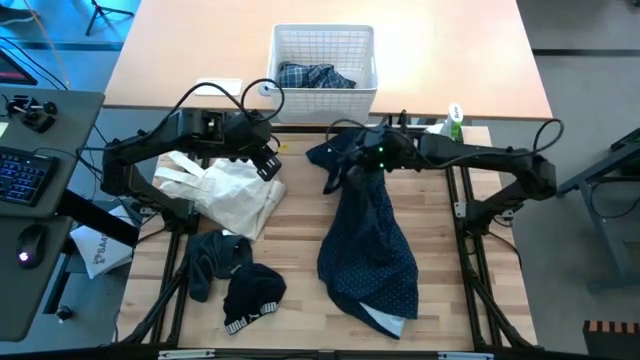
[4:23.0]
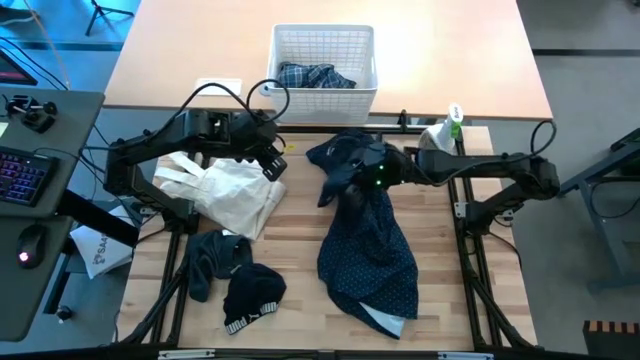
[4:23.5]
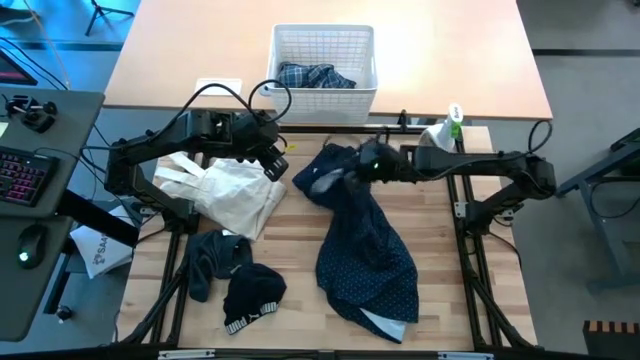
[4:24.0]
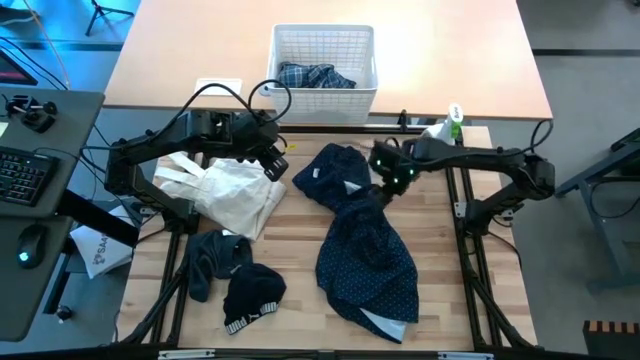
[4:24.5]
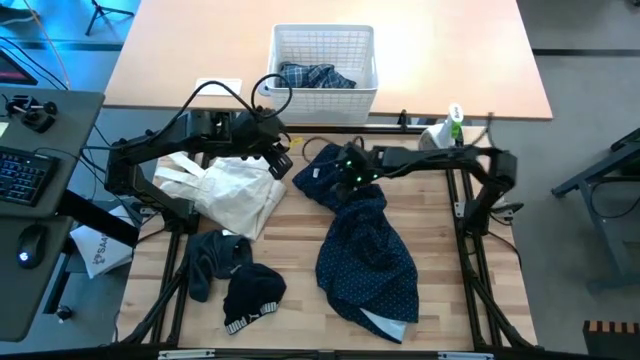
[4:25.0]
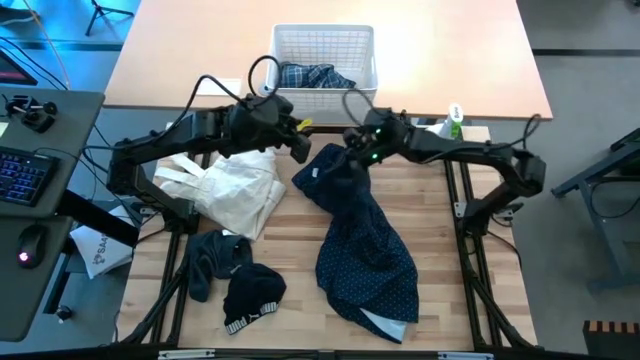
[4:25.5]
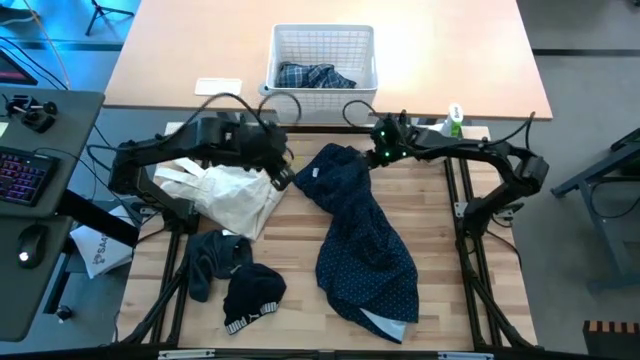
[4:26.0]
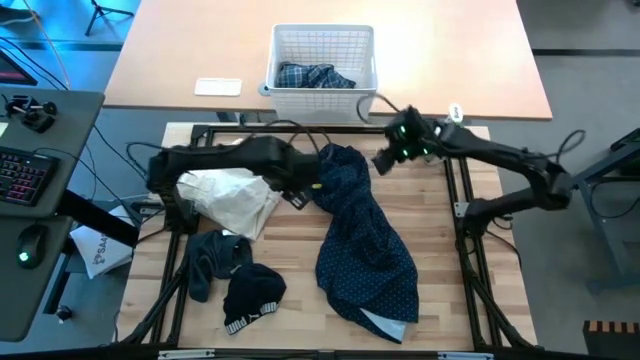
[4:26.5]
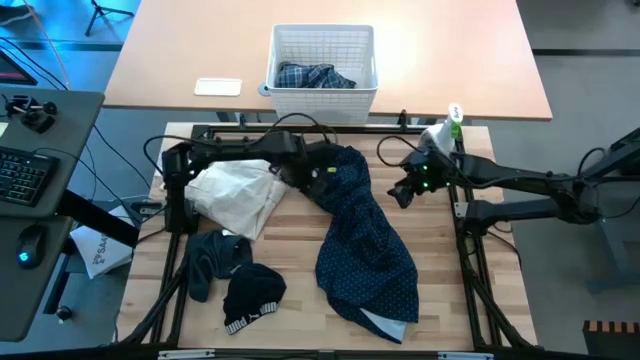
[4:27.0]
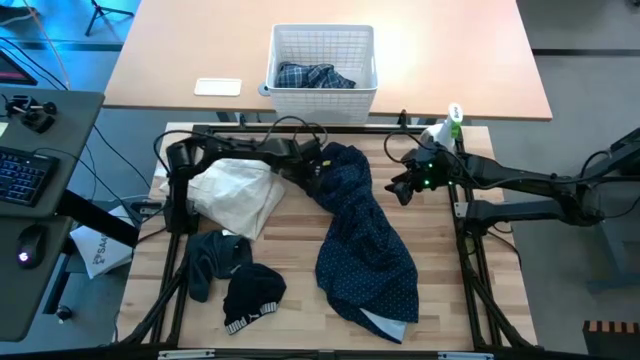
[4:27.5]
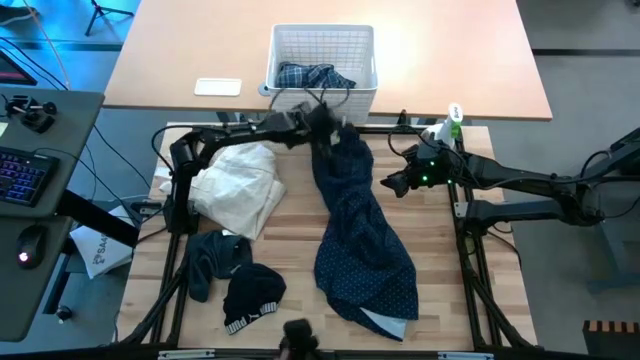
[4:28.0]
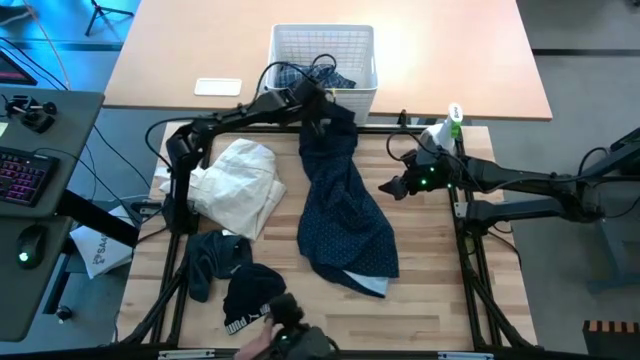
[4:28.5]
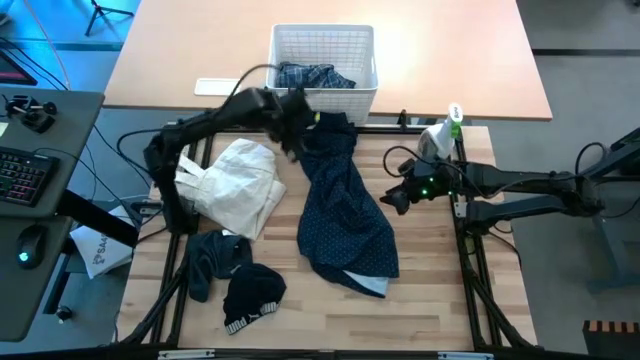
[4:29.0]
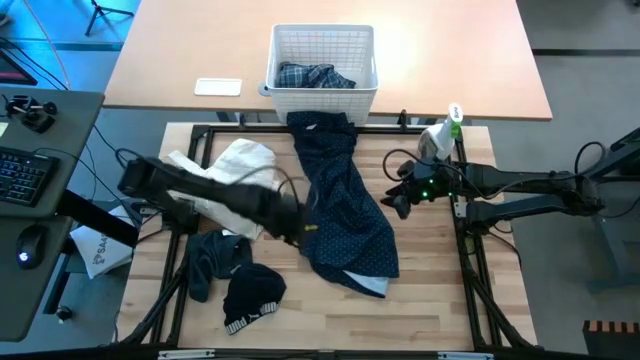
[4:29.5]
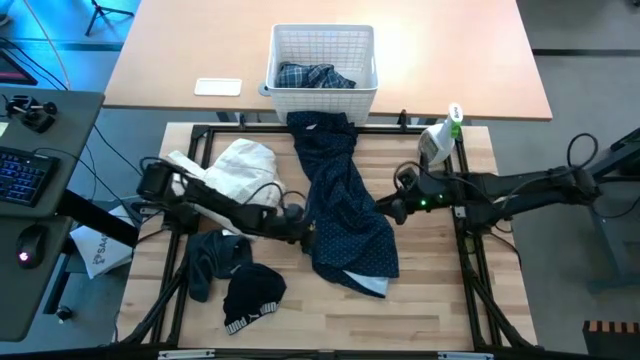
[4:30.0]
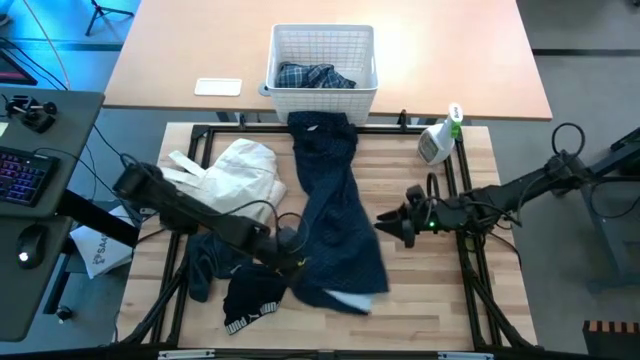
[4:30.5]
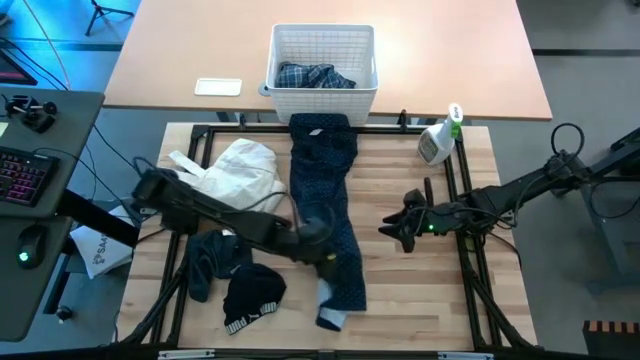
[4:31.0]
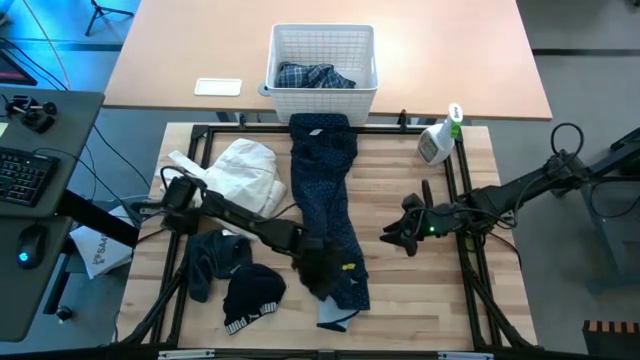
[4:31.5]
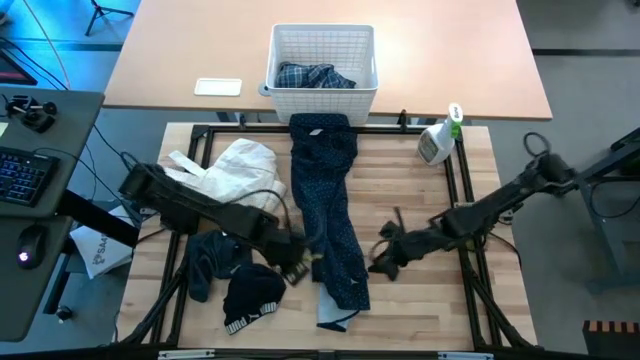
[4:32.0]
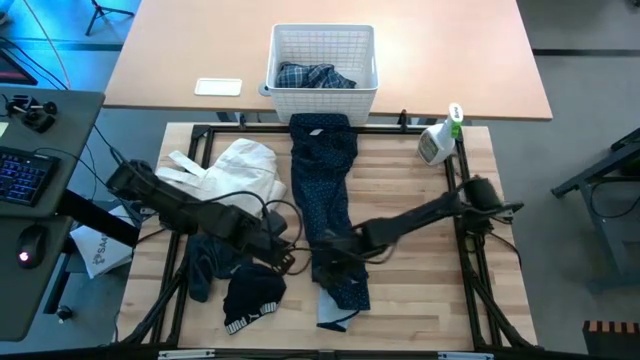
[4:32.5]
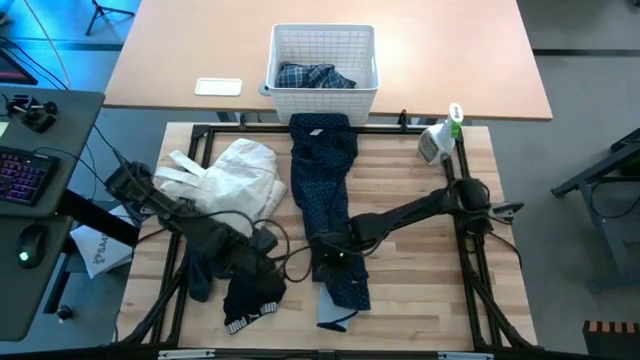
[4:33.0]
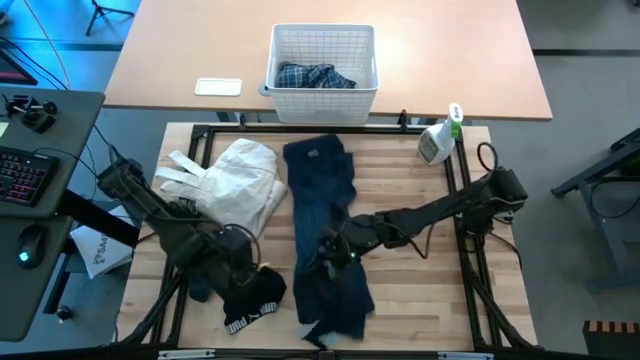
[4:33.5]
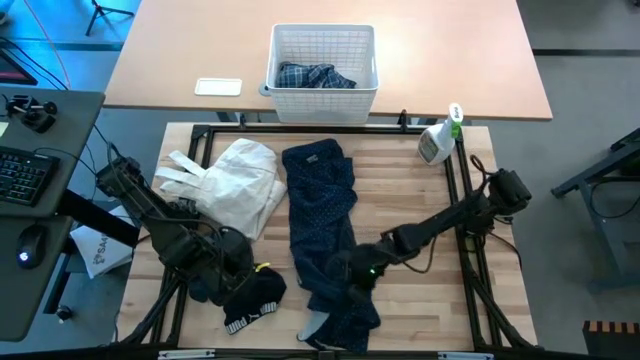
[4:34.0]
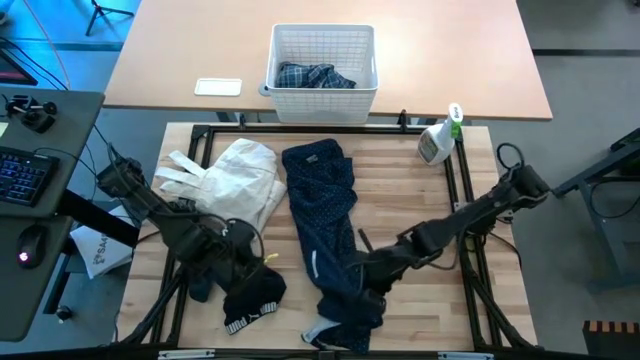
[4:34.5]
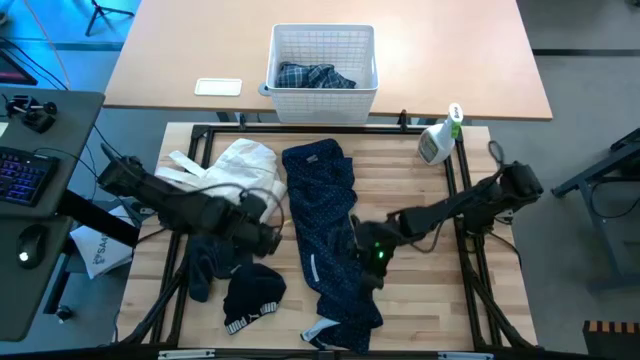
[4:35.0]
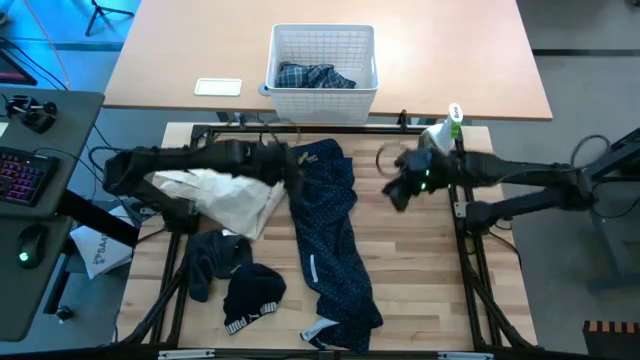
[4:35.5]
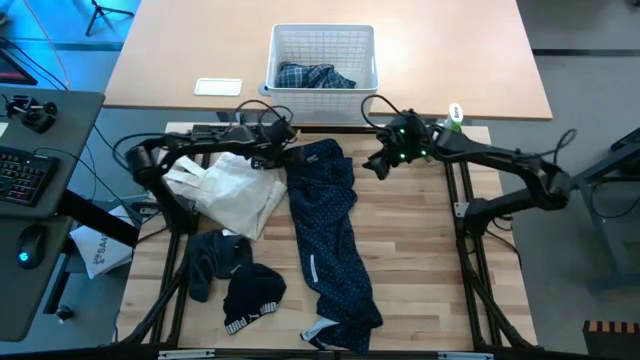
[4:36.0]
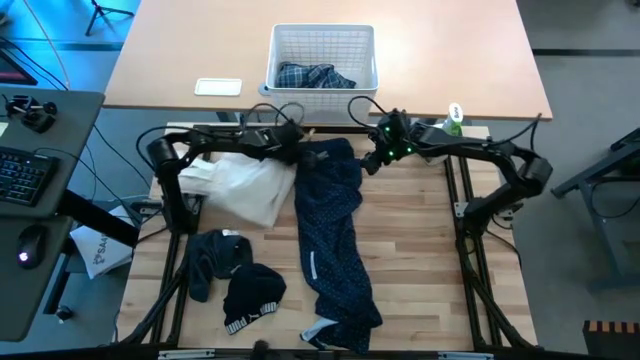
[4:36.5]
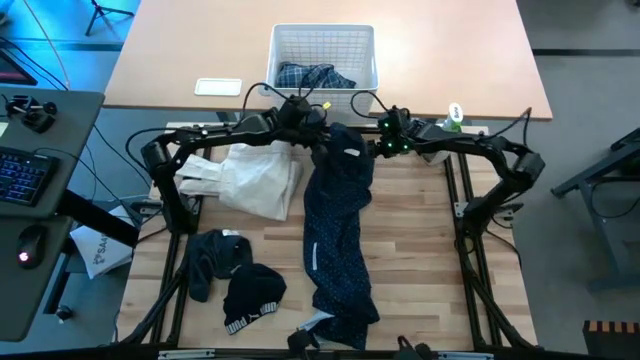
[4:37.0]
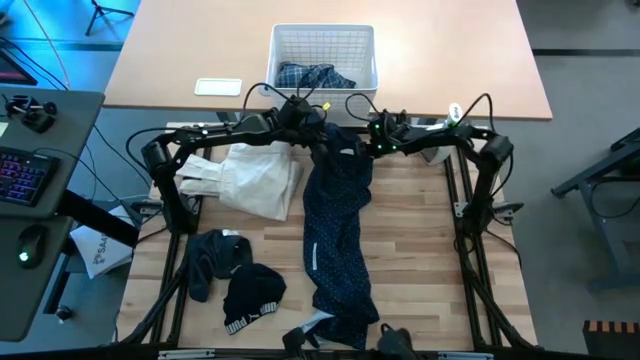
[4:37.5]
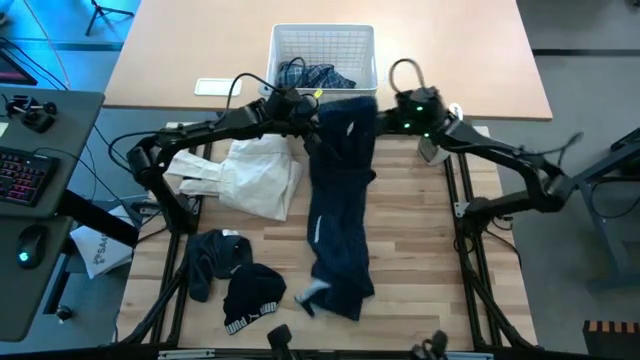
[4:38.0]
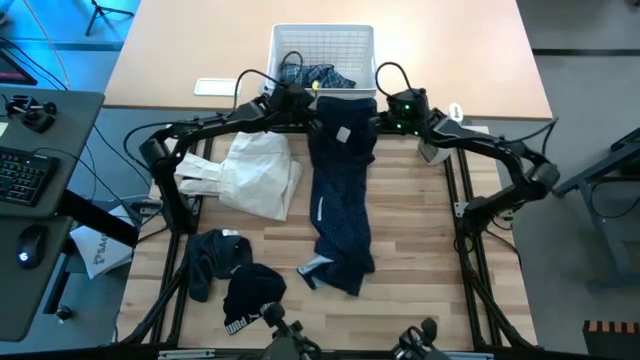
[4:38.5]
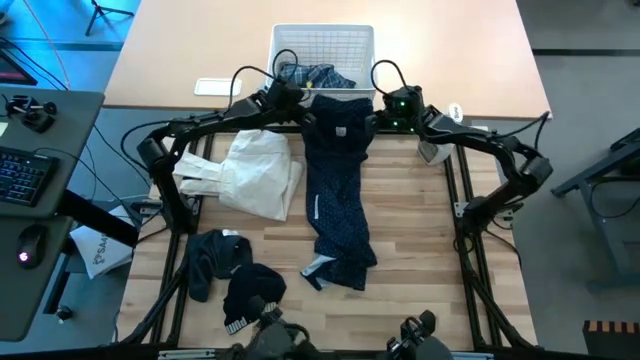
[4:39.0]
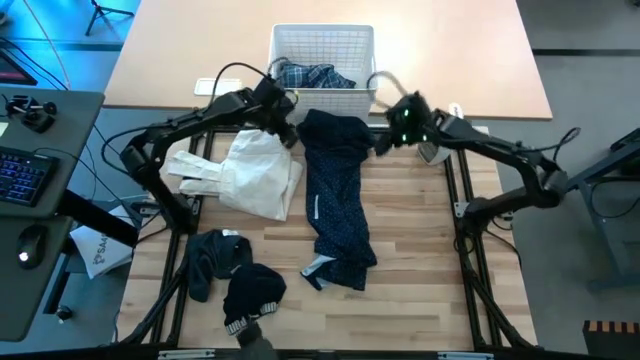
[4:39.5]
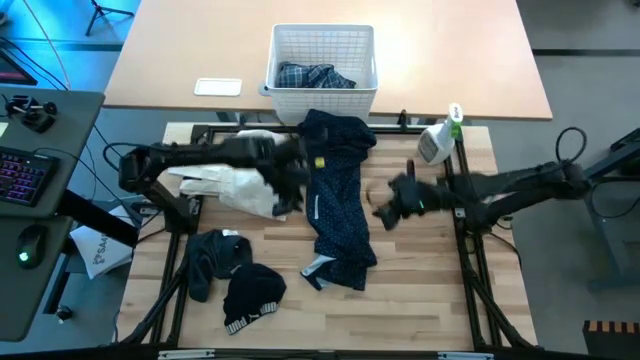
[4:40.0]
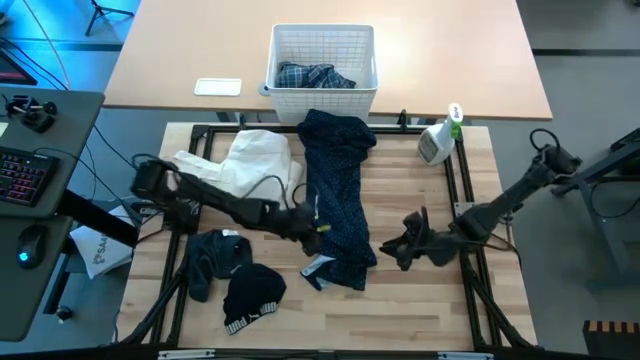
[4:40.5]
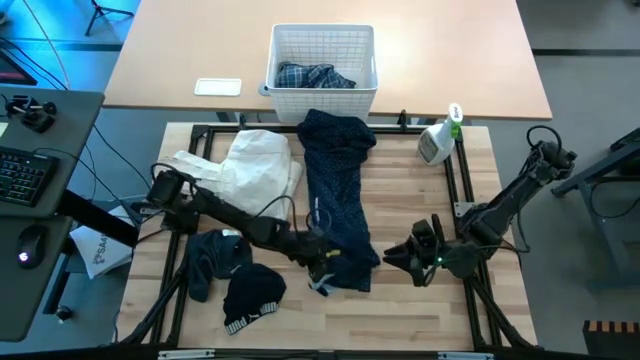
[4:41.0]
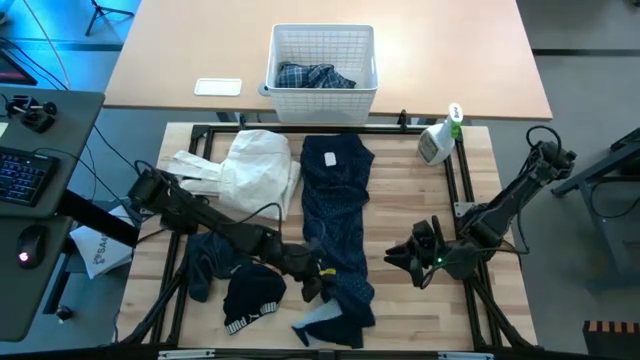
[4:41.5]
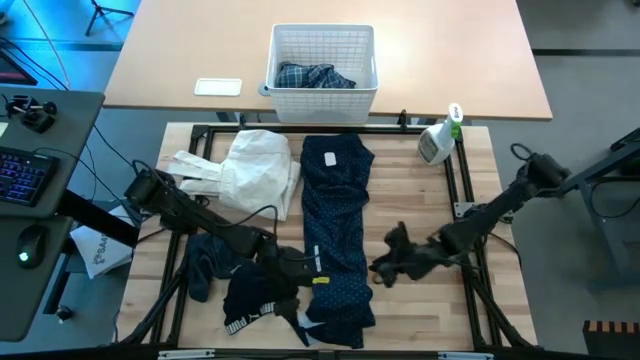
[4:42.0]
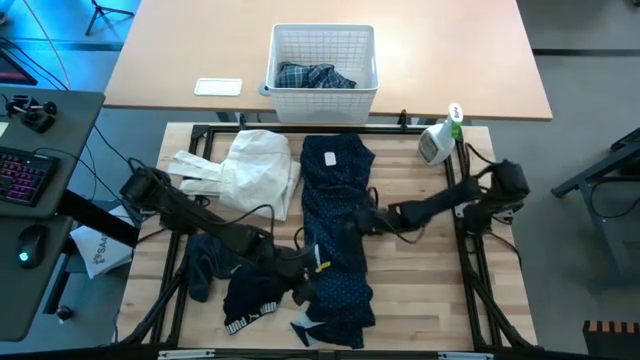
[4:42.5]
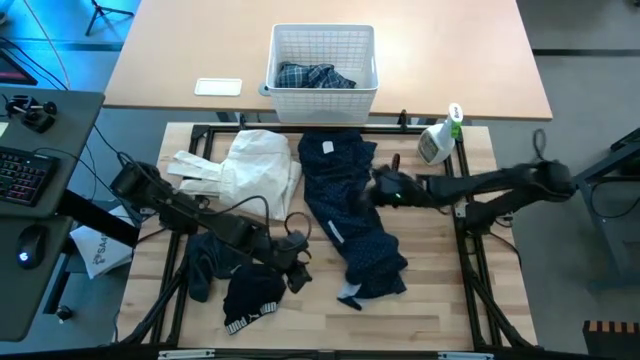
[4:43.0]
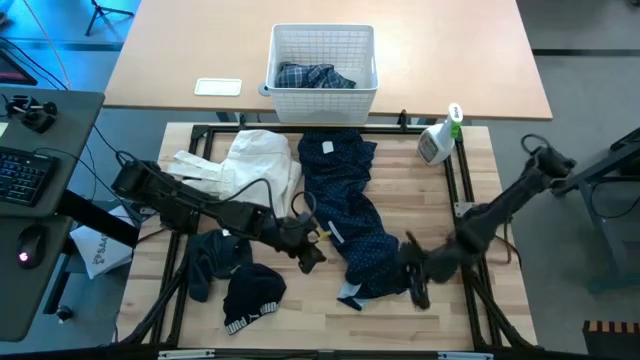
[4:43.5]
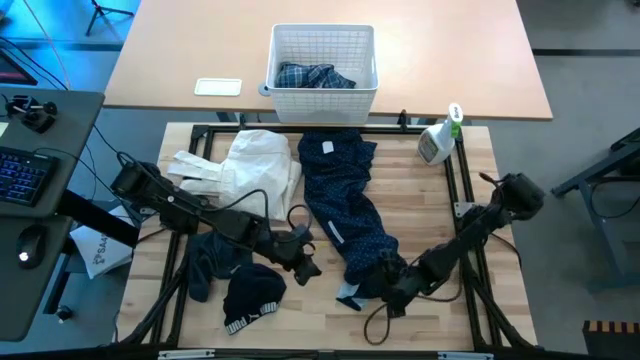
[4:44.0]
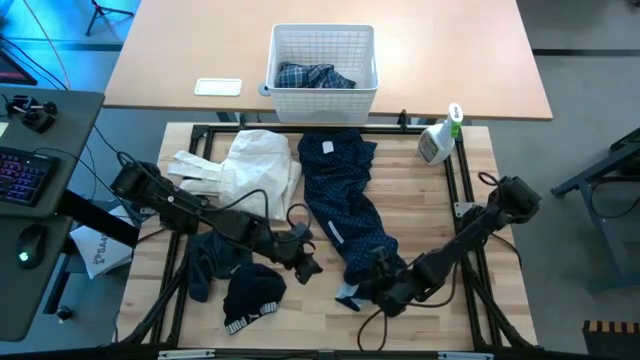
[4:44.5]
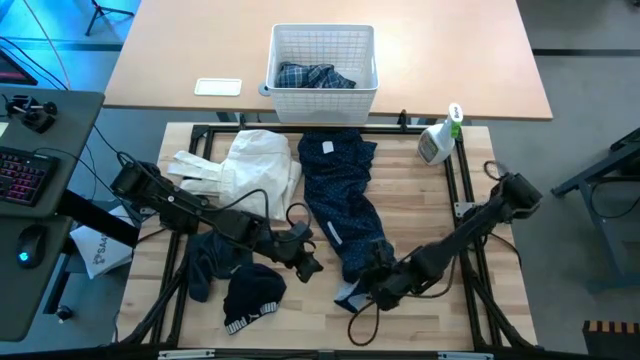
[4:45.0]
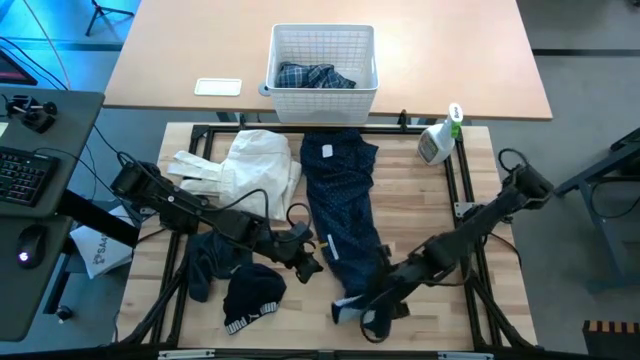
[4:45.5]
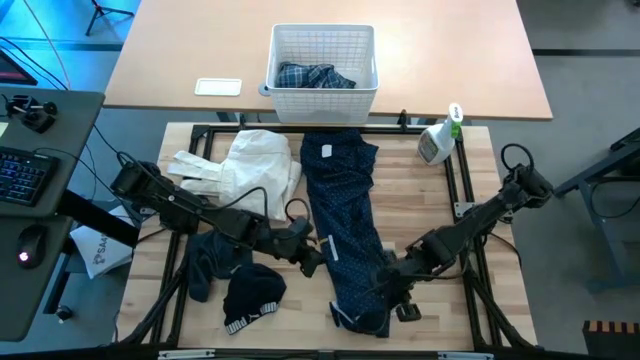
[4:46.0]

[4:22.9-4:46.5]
Task: Fold laundry
Fold the navy blue polo shirt
